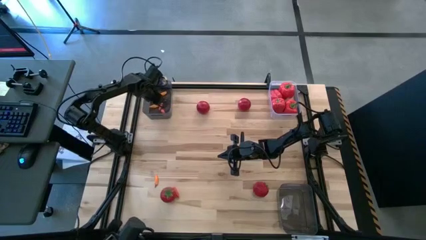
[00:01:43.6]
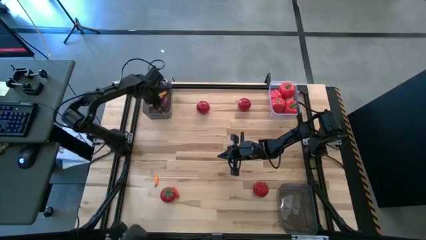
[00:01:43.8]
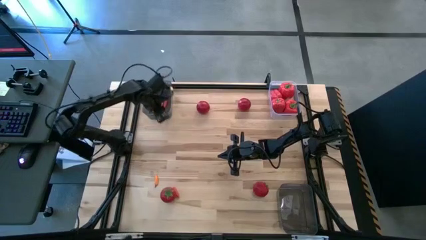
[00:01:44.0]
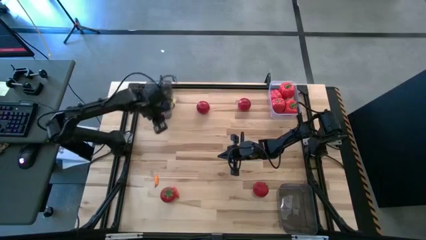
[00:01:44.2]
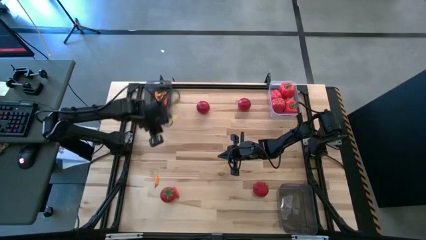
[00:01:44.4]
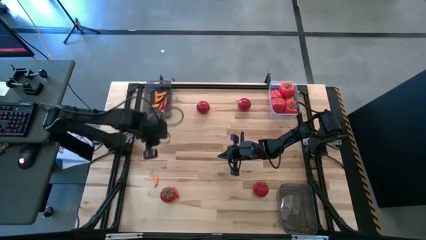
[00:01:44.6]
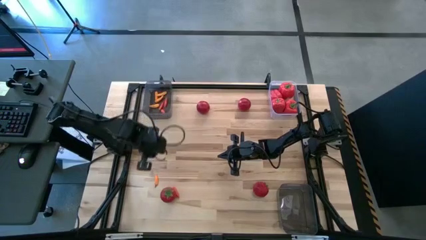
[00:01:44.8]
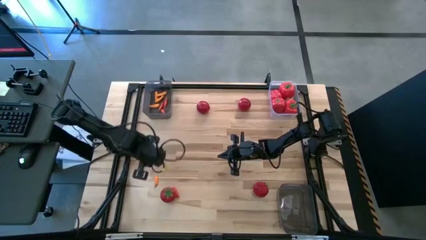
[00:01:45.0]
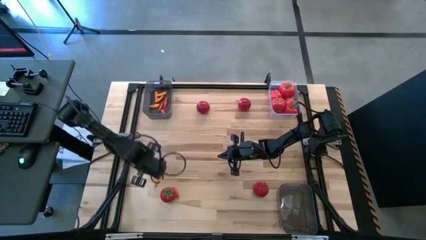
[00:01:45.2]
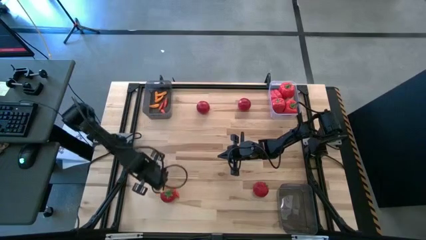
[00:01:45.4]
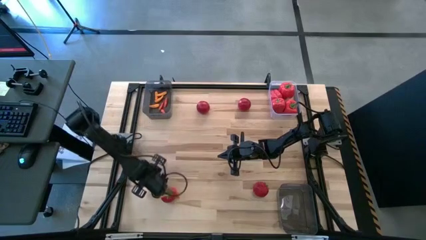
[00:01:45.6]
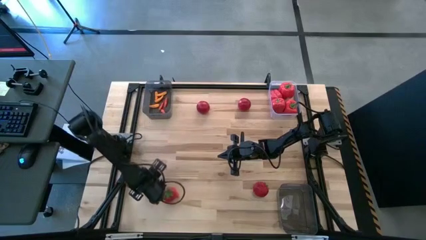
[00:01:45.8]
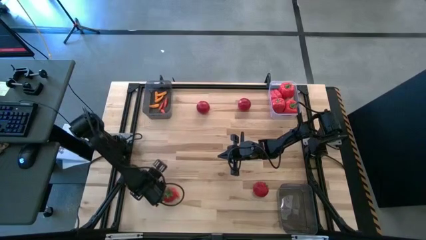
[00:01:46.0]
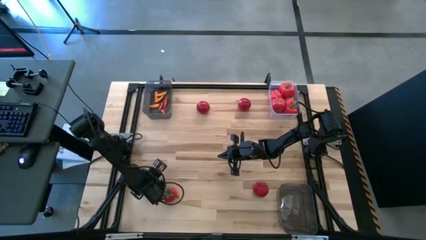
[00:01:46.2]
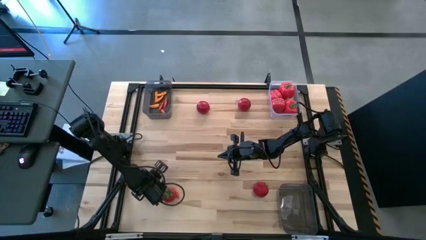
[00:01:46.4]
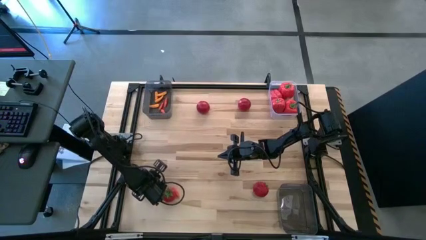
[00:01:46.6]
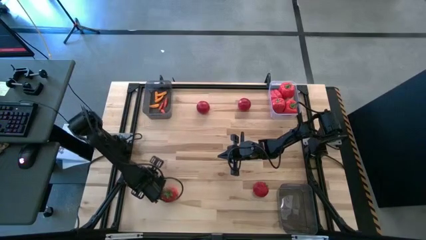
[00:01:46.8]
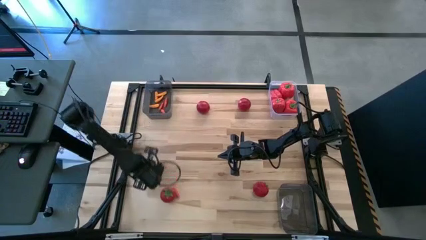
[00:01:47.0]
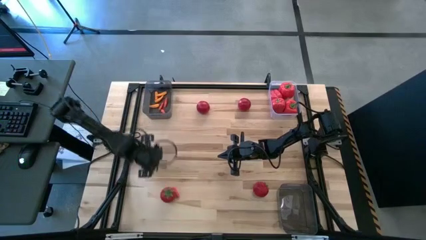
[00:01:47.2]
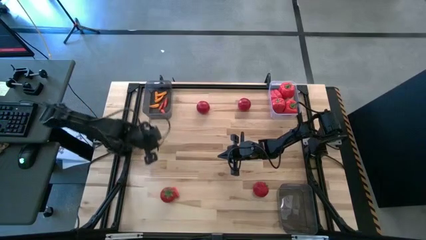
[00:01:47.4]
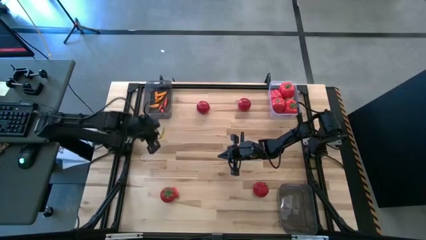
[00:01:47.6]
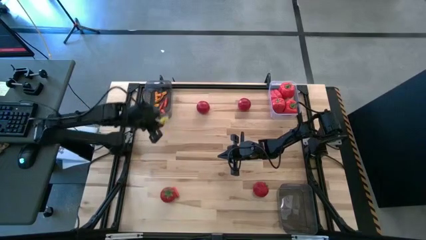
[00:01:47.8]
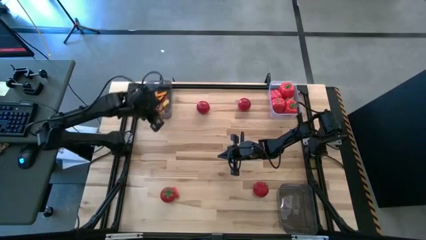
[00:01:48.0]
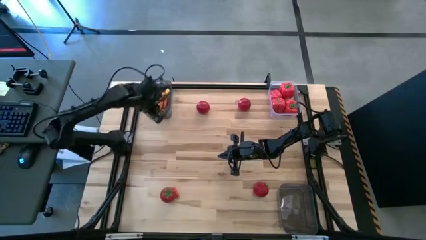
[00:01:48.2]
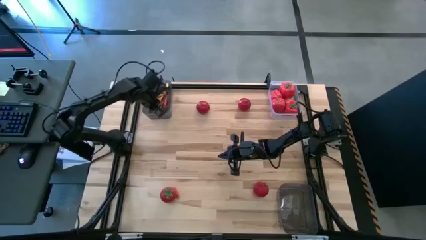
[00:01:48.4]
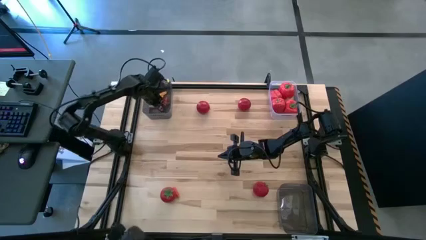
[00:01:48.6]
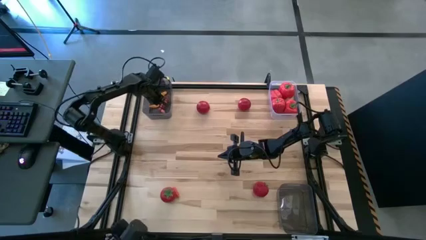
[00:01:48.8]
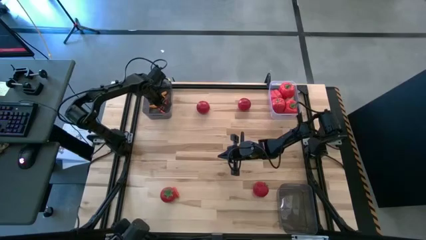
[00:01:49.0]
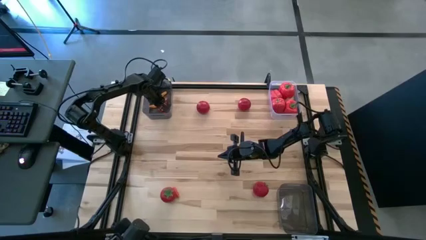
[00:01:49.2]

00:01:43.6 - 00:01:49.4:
Task: Sort produce into baskets
Put the yellow chili pepper into the top black bin

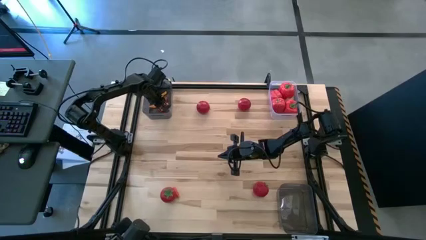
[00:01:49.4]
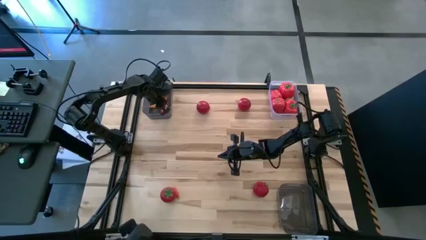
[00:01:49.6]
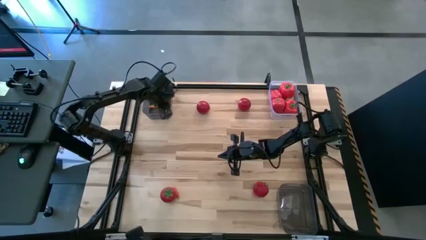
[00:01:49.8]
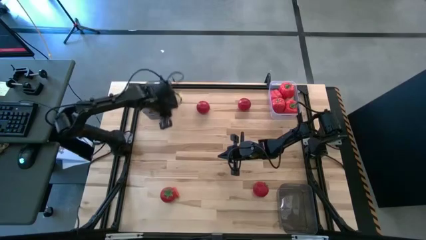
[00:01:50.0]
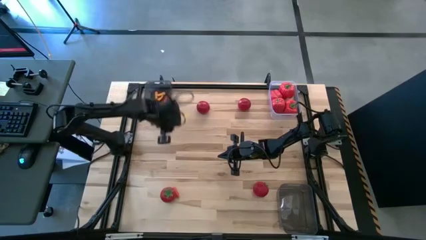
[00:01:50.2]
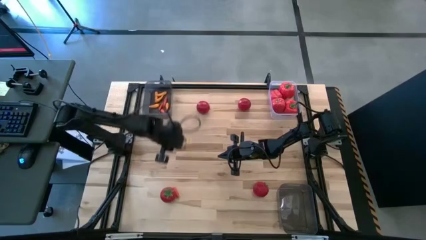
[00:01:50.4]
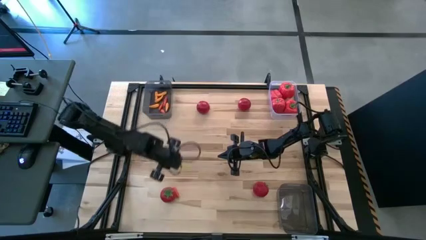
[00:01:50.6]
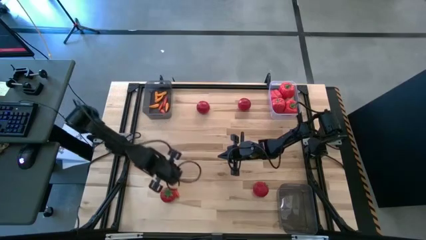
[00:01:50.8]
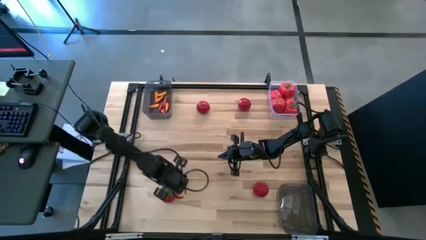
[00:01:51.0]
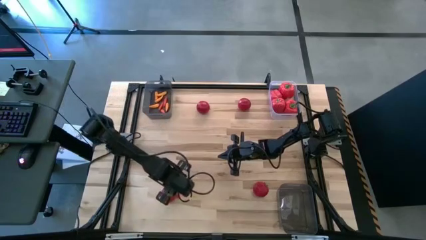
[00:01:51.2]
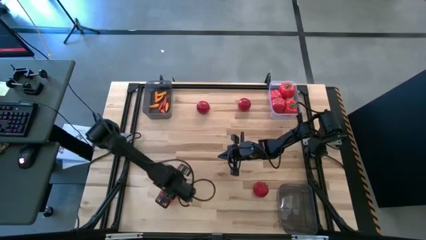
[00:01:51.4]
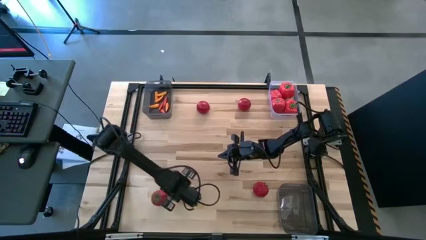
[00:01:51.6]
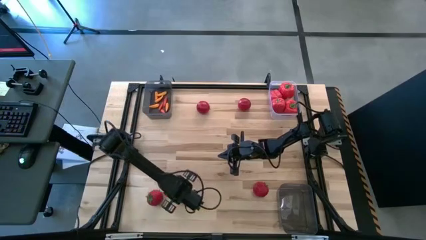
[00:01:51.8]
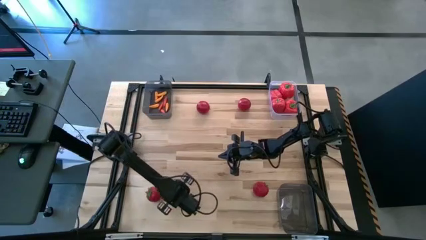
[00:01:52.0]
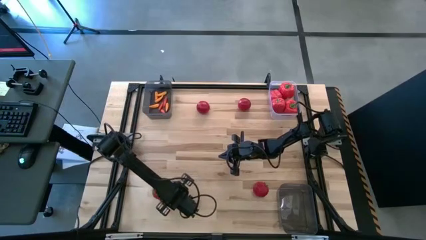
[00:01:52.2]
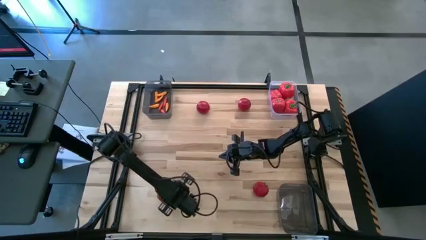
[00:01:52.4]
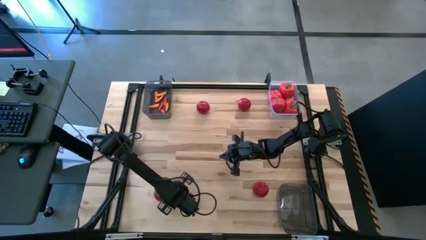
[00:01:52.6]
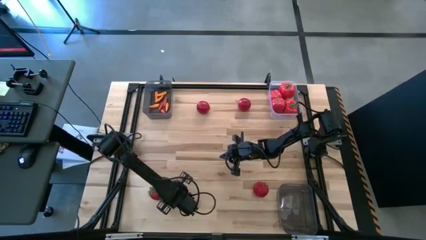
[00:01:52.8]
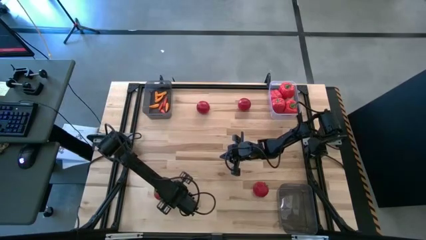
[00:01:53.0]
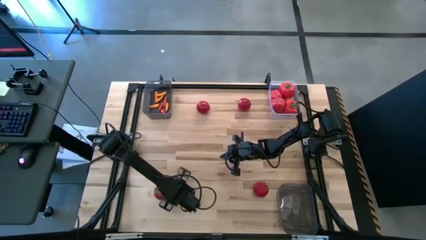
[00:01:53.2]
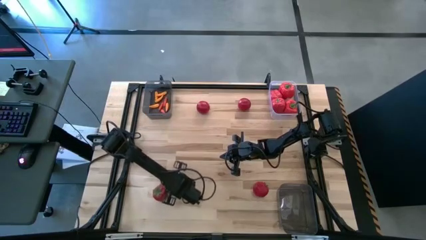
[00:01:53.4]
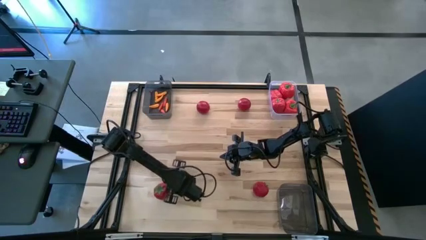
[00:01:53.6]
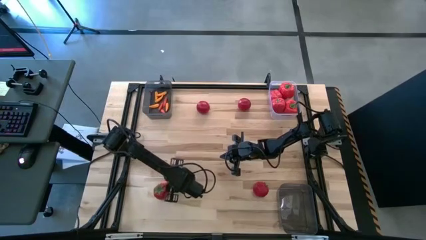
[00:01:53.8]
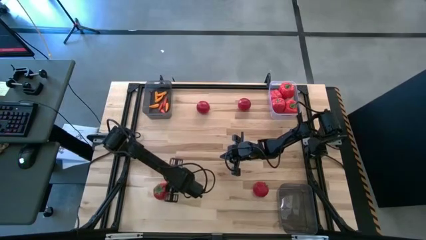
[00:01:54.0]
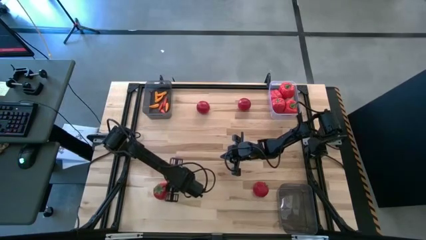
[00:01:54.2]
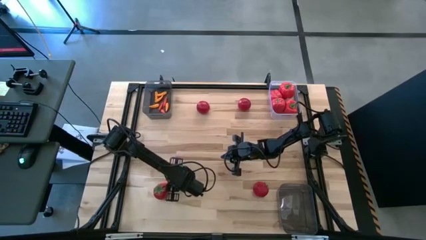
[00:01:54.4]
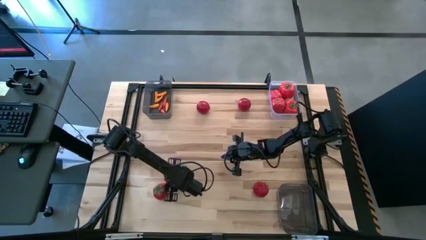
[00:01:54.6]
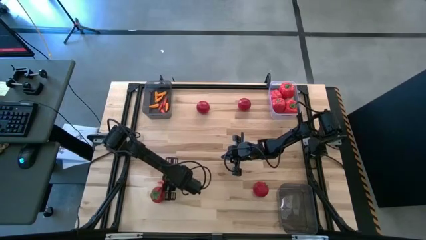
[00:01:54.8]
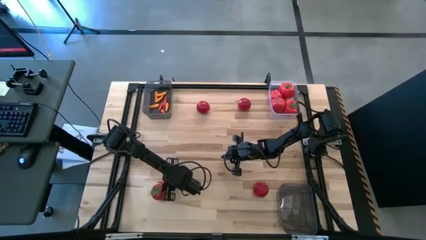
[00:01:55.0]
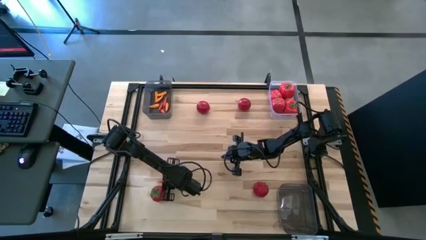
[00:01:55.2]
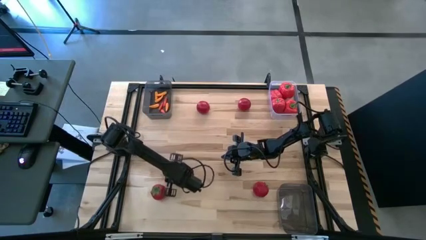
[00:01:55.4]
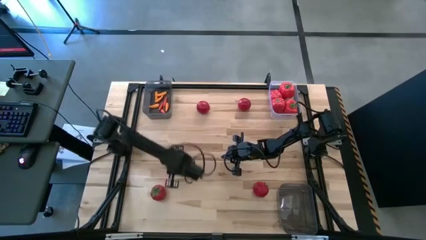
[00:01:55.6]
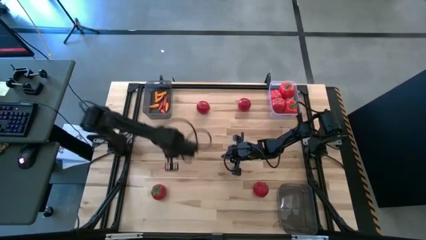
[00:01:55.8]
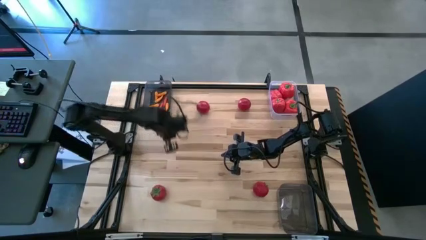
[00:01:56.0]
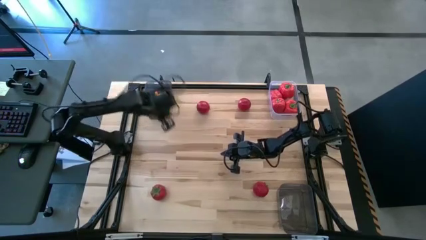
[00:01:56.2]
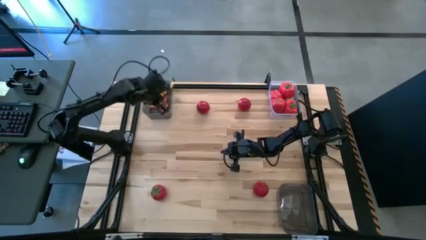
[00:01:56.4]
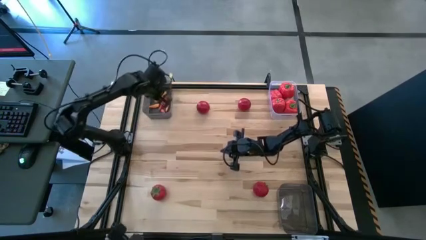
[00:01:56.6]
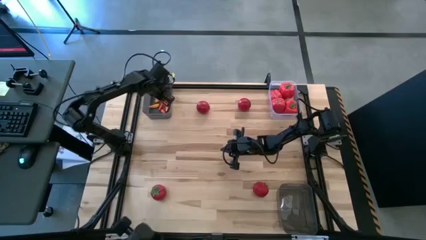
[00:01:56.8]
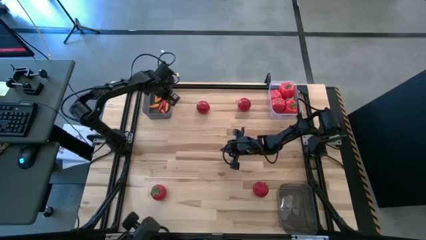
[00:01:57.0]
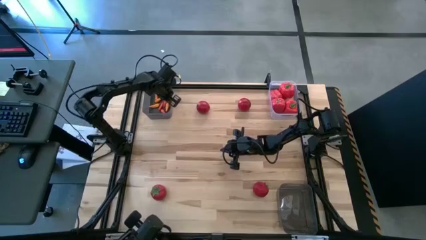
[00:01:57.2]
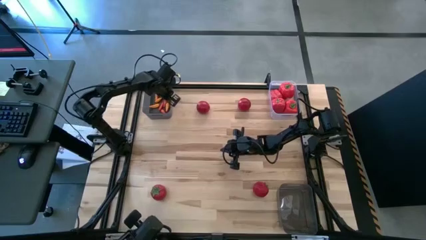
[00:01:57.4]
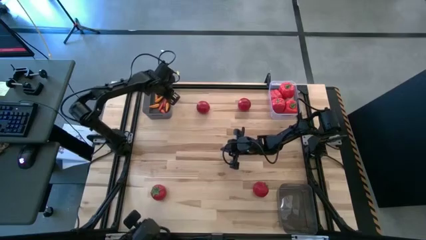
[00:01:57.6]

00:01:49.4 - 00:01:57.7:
Put the orange chili pepper into the top black bin

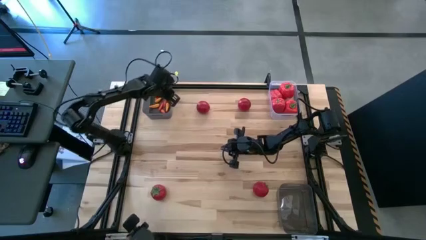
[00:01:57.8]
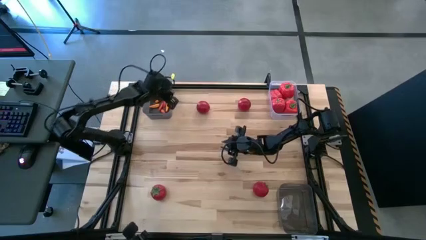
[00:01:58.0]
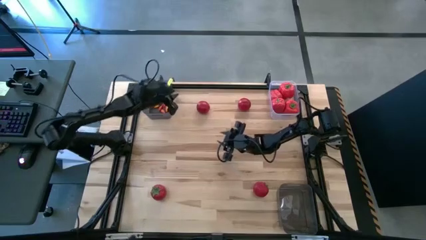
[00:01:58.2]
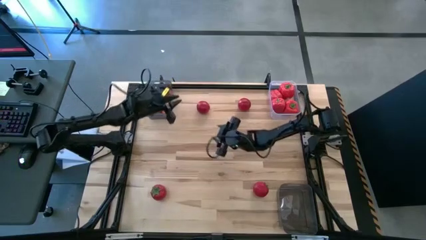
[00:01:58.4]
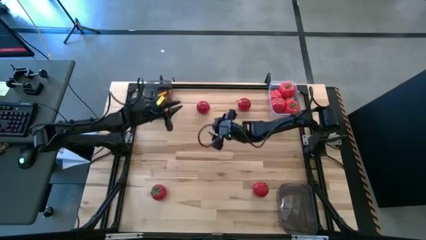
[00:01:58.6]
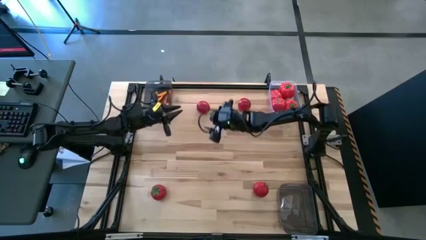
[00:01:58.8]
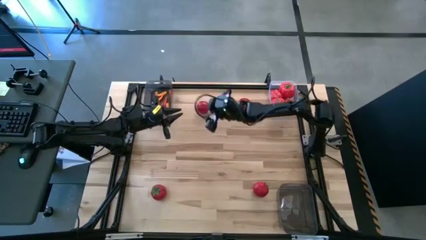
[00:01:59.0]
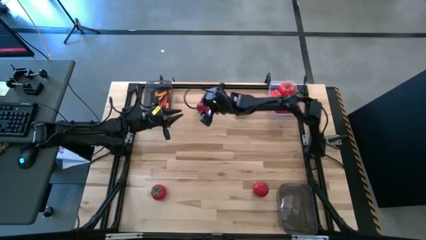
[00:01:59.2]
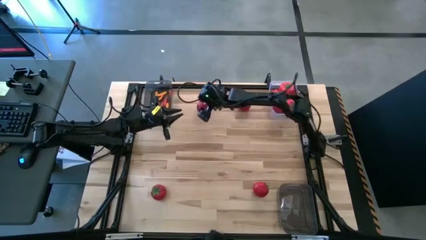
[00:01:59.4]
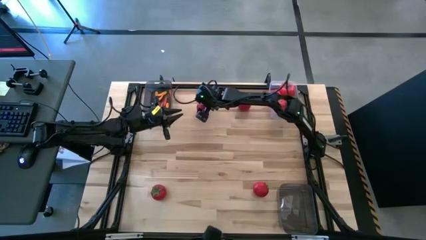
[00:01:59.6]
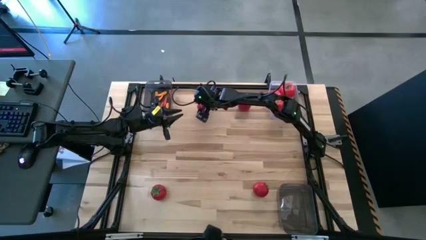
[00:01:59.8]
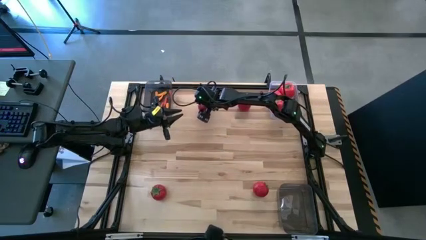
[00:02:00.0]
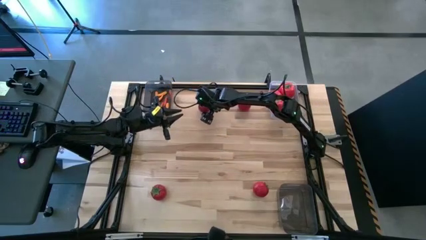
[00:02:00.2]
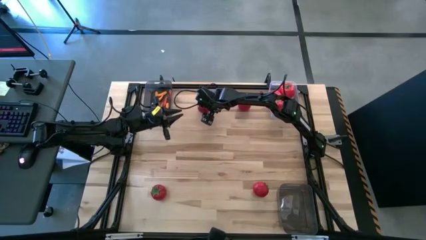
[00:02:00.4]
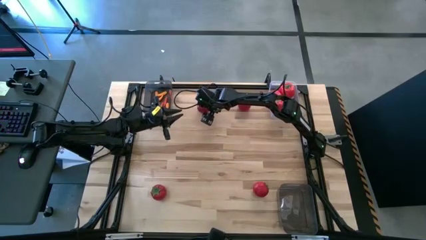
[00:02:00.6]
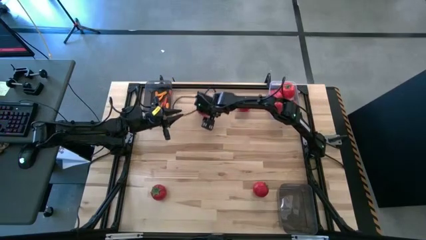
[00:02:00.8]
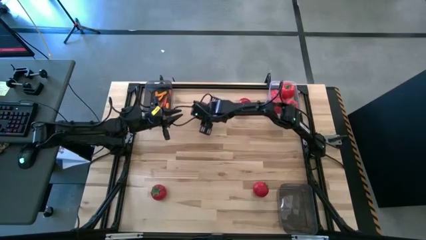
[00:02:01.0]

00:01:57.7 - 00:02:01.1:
Put the tomato into the bottom black bin
